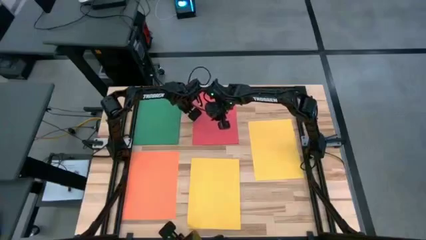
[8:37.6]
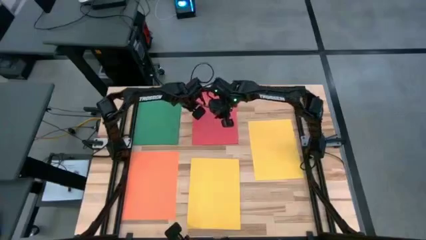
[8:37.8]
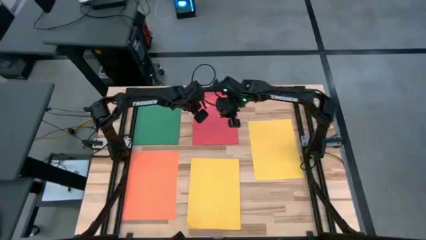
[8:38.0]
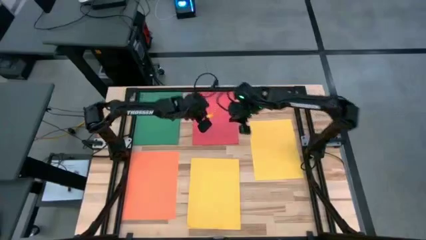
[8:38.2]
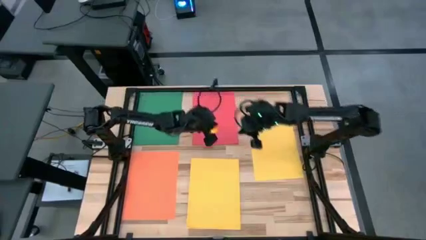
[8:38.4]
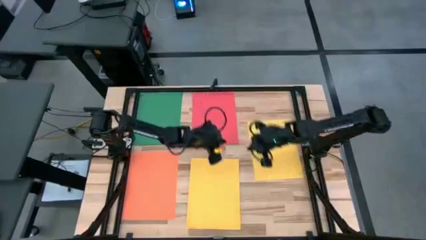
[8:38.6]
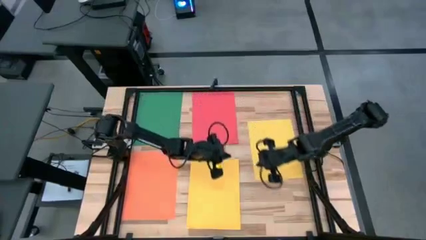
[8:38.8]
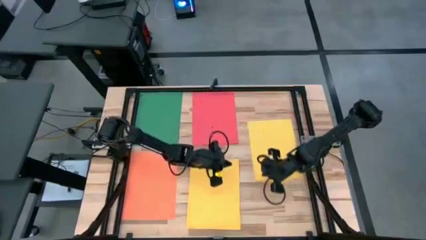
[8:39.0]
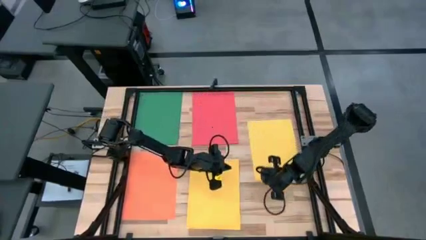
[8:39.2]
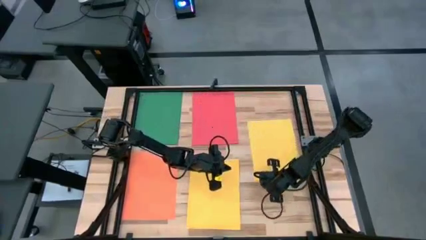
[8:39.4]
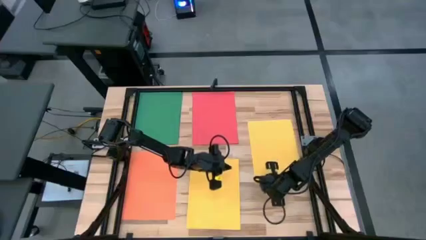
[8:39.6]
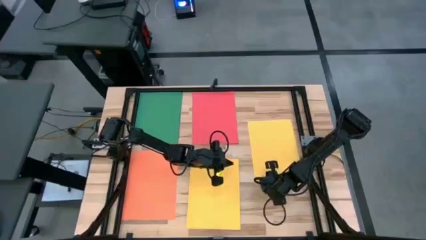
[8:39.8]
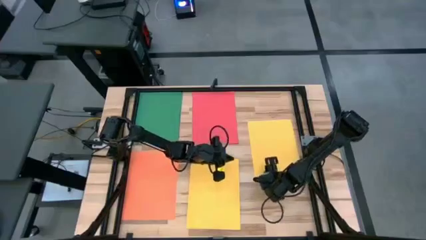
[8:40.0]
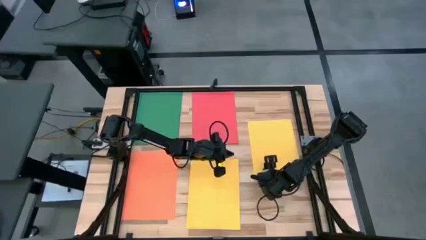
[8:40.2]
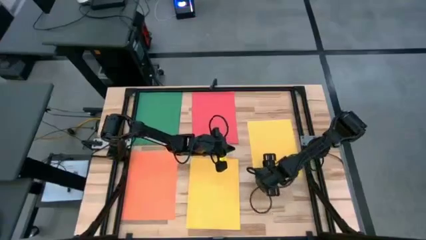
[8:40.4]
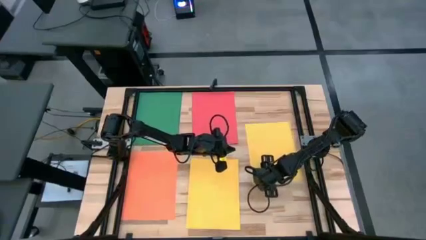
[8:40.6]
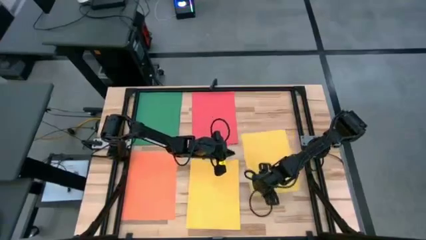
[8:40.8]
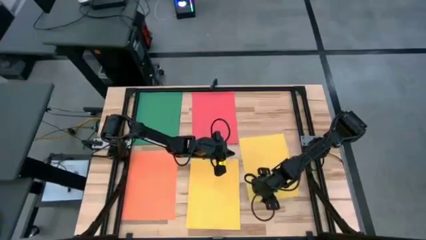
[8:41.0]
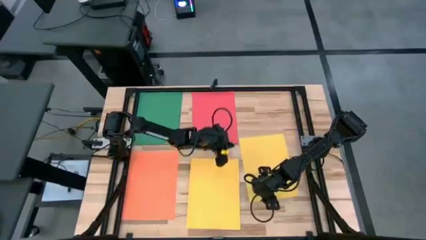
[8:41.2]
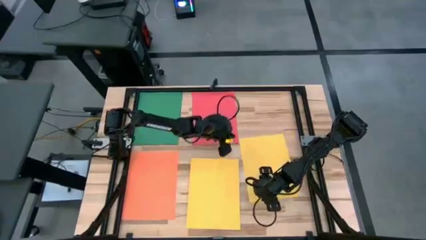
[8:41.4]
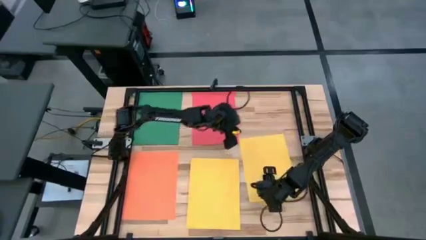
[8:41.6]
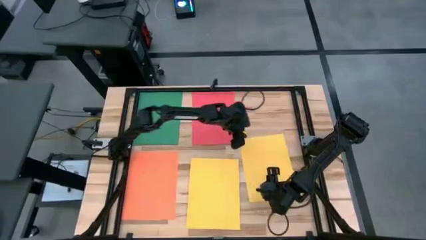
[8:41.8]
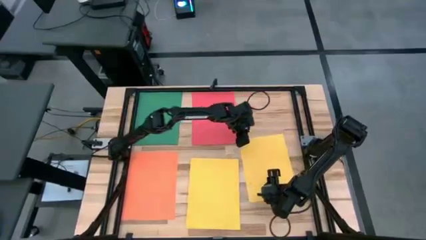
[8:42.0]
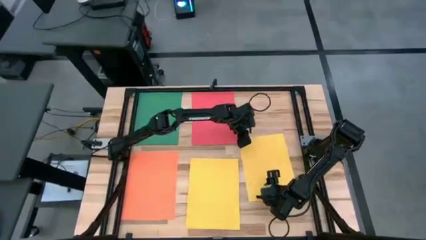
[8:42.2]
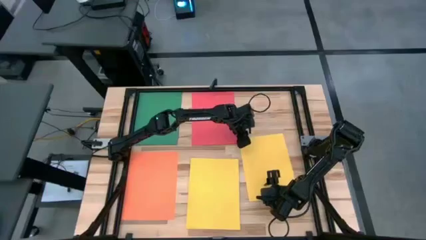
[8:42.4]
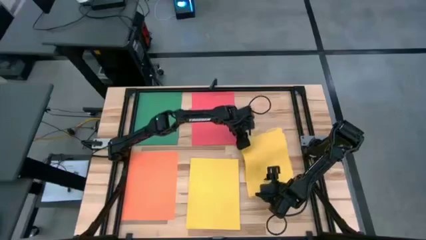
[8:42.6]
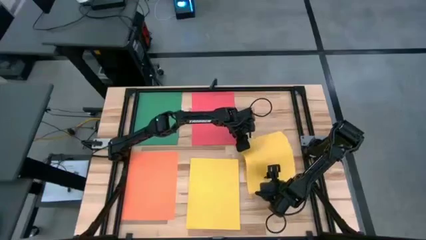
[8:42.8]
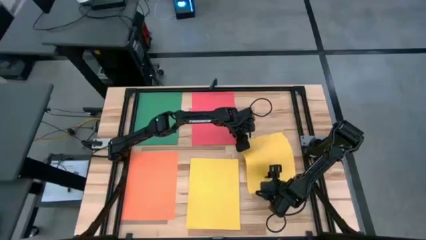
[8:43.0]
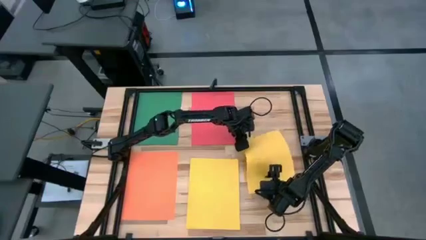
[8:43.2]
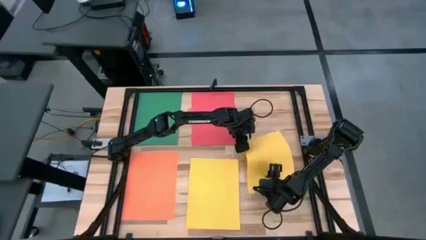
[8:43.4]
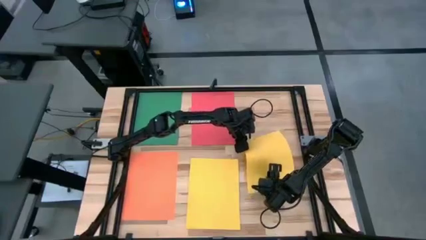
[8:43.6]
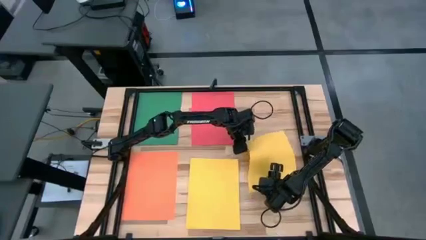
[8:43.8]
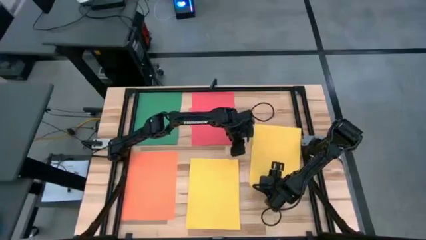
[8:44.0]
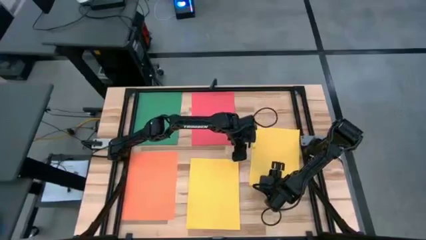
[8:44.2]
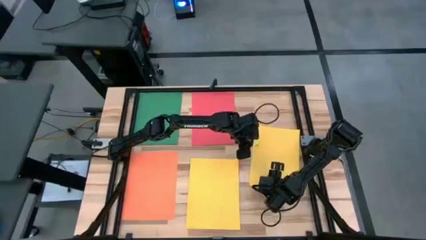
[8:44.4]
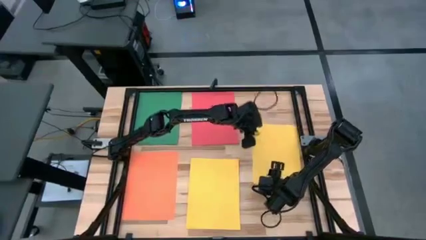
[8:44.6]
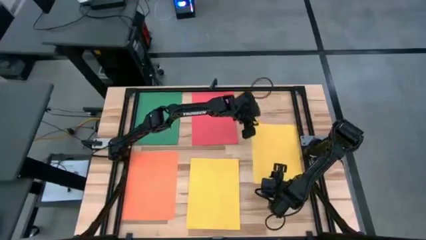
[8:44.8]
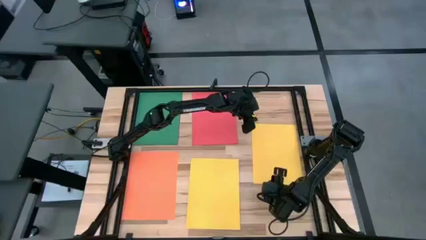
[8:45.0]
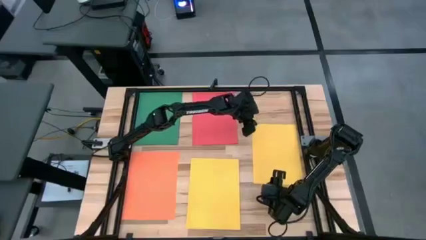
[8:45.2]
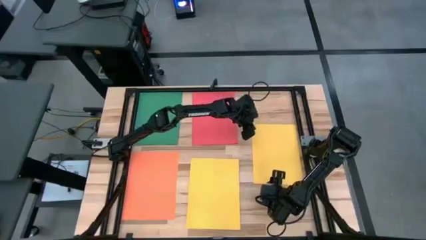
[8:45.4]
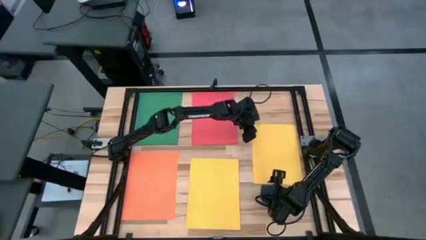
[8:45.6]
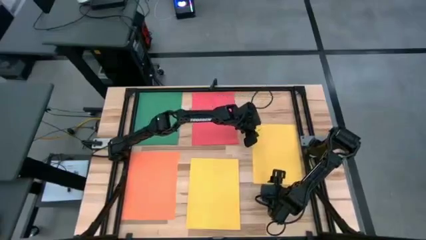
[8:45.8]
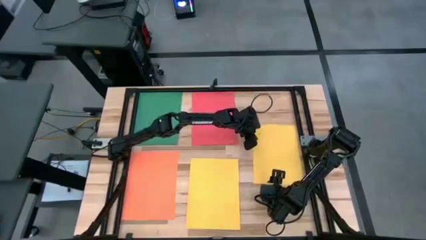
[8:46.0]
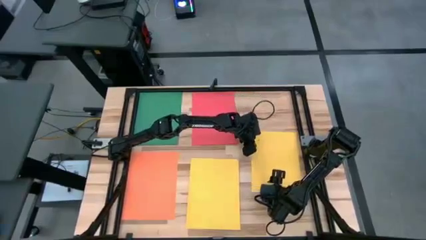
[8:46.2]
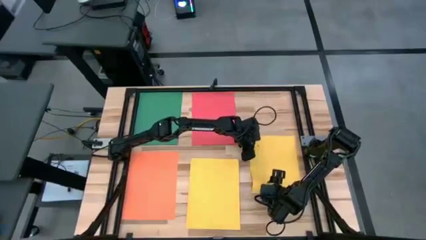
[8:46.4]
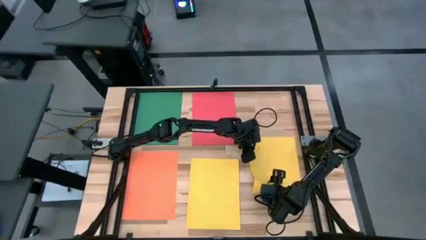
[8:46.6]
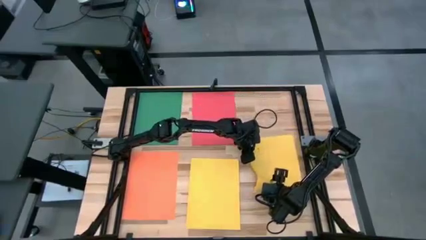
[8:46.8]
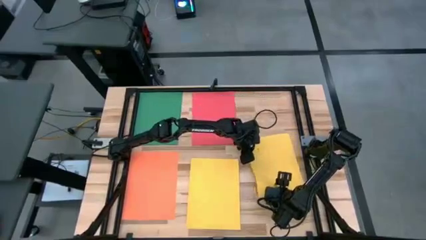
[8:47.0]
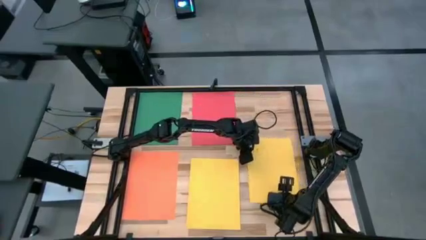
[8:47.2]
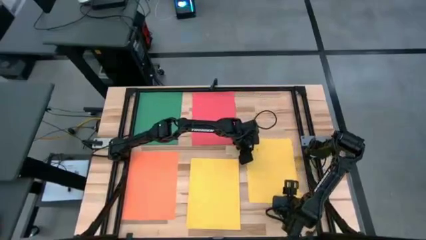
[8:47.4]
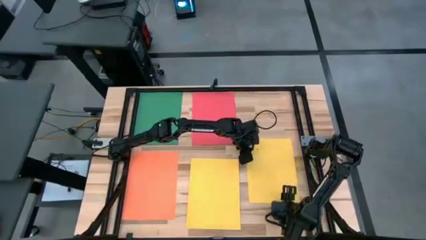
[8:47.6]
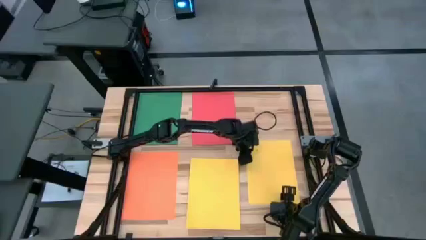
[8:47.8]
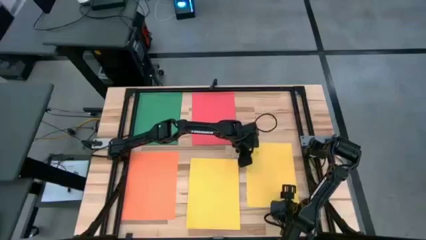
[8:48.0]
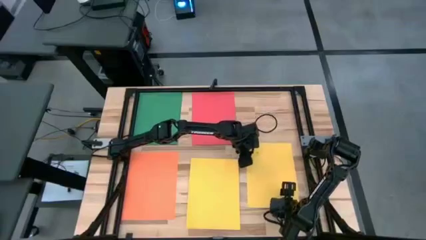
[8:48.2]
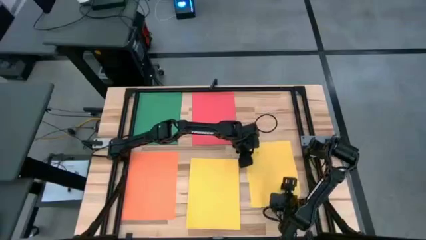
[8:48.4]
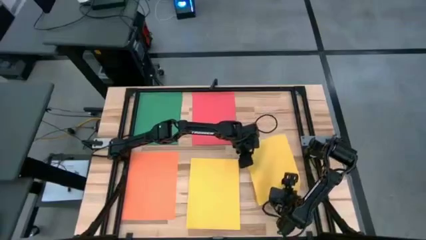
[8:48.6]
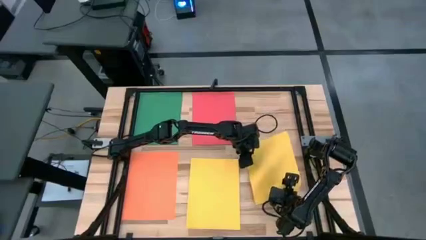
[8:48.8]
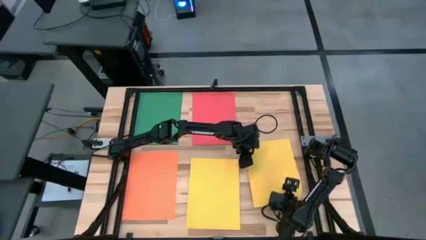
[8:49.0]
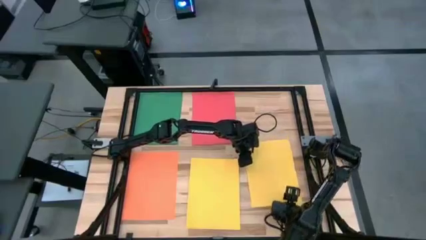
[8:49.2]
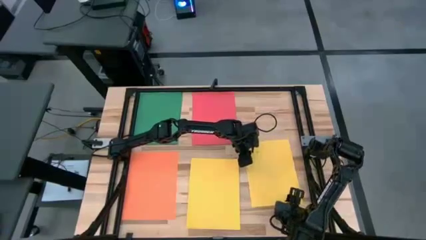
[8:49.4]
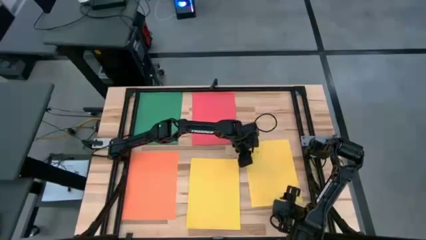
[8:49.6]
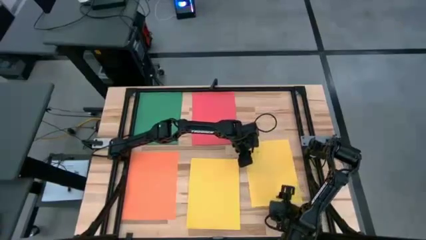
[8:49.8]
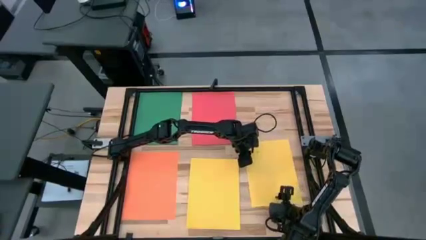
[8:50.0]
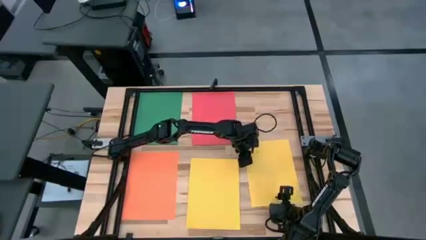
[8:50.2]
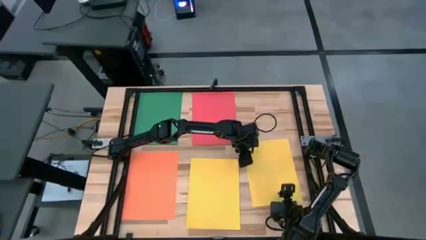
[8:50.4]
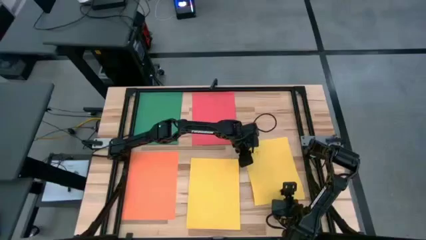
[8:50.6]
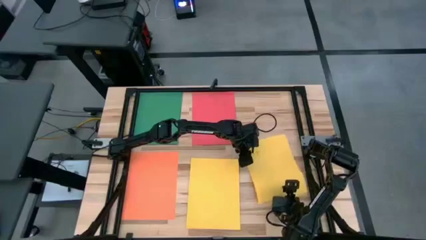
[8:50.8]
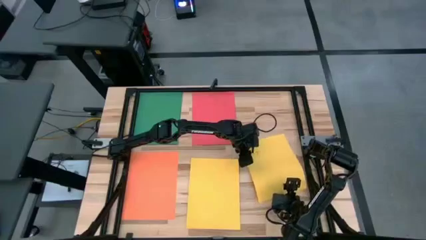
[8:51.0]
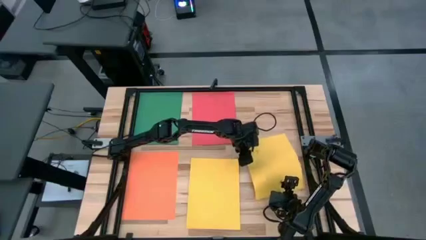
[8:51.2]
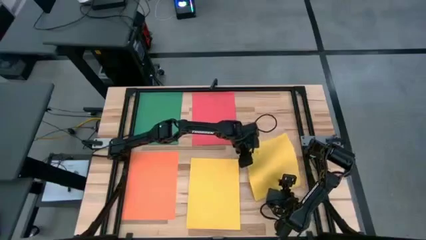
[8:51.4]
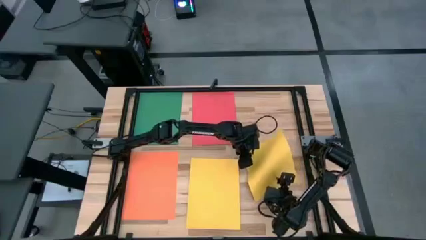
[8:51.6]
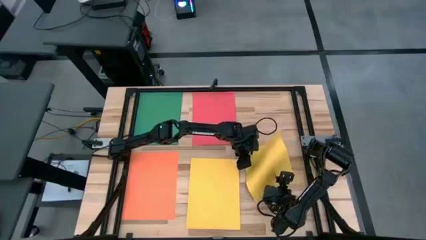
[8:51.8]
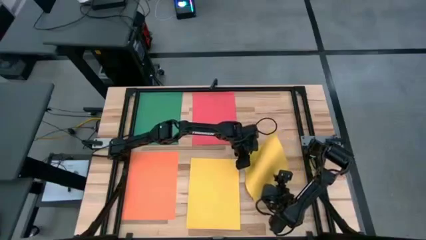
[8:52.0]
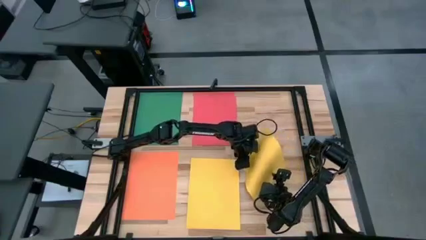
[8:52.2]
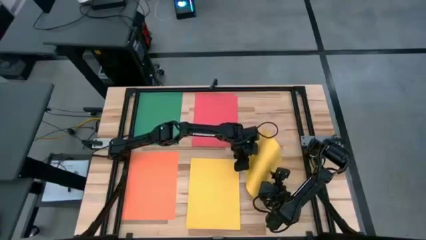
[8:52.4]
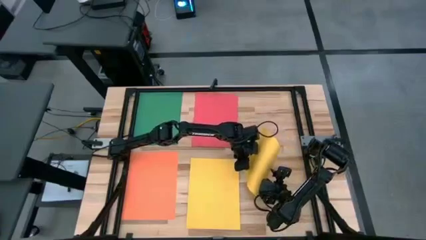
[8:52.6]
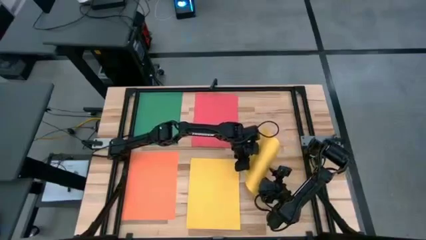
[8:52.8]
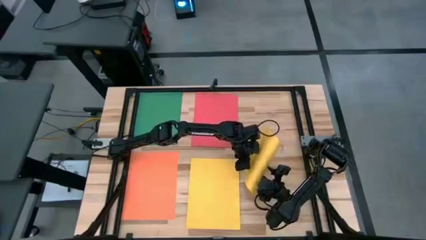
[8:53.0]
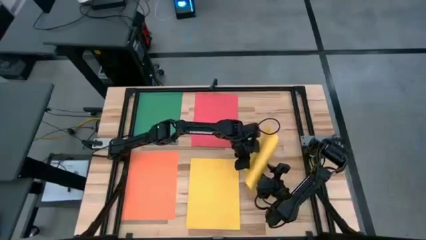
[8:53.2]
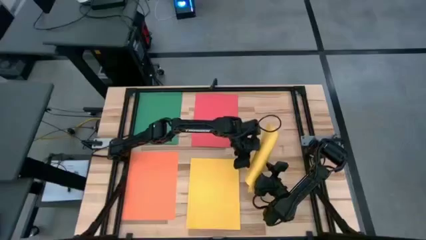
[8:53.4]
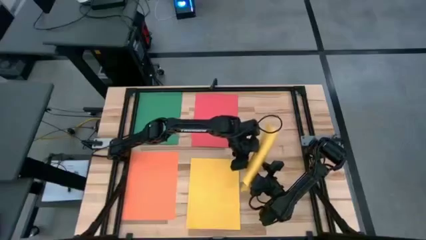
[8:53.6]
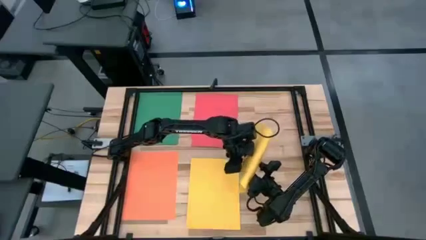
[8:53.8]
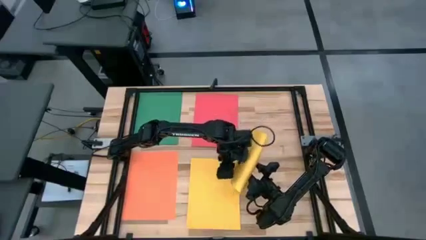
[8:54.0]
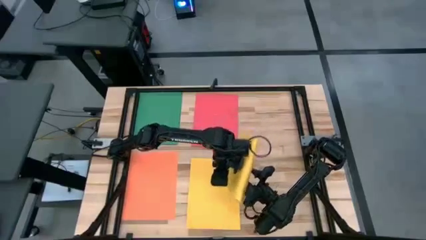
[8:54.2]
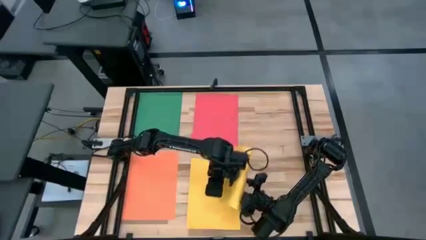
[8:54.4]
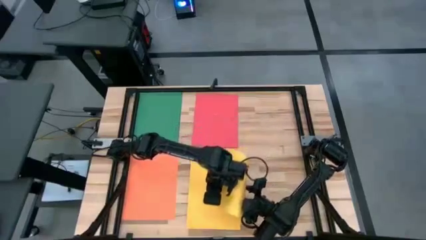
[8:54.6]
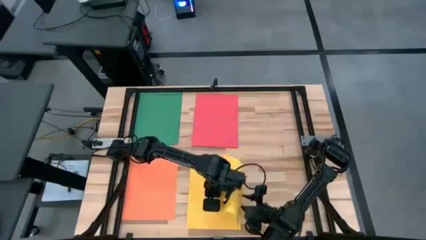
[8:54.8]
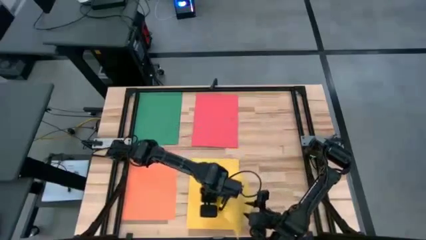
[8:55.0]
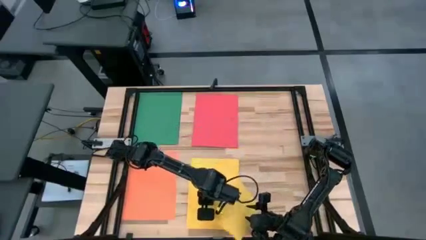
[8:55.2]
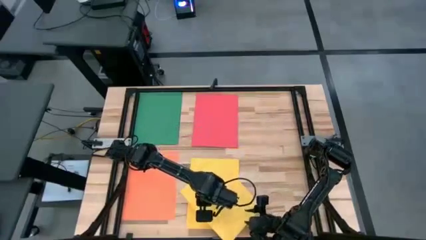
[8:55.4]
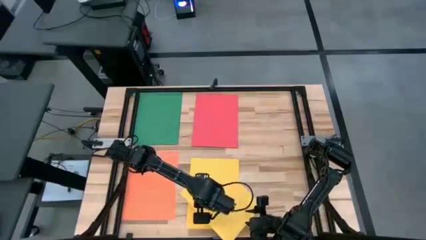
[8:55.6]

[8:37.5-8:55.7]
Task: Organize paper
Stack the yellow paper on top of the yellow paper
